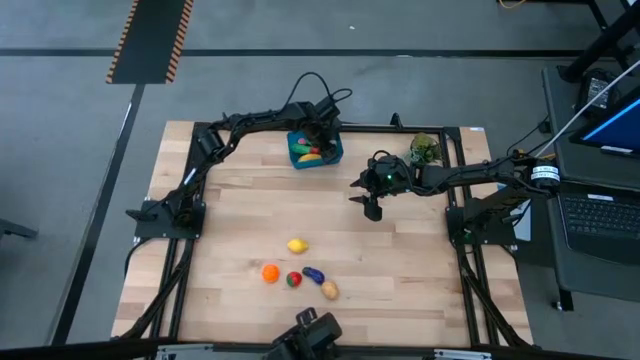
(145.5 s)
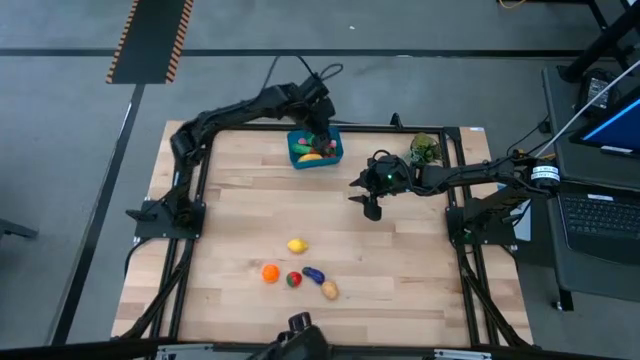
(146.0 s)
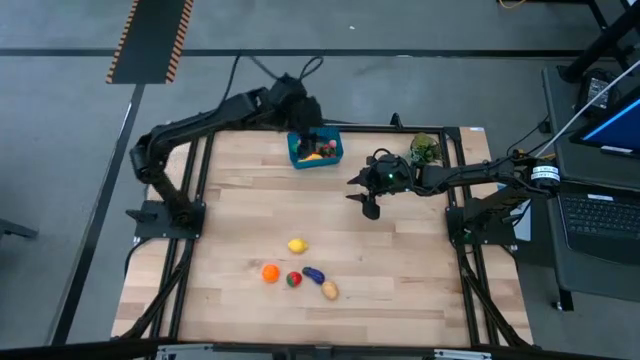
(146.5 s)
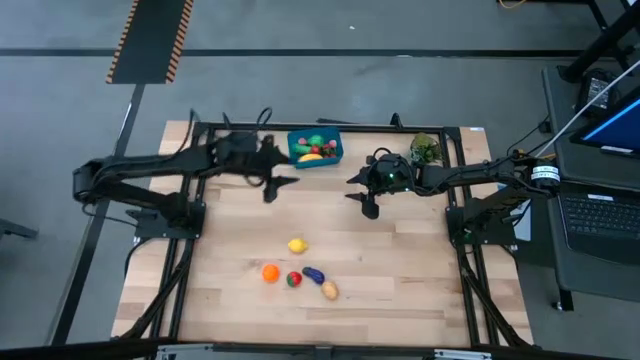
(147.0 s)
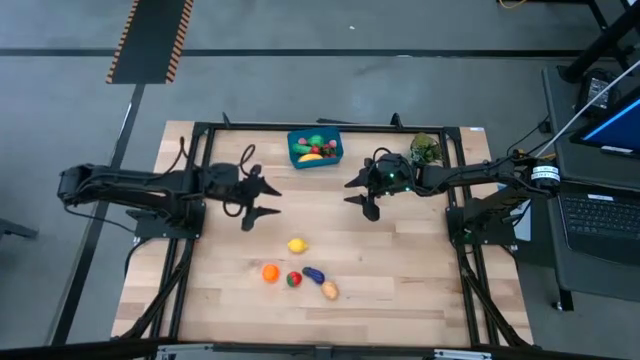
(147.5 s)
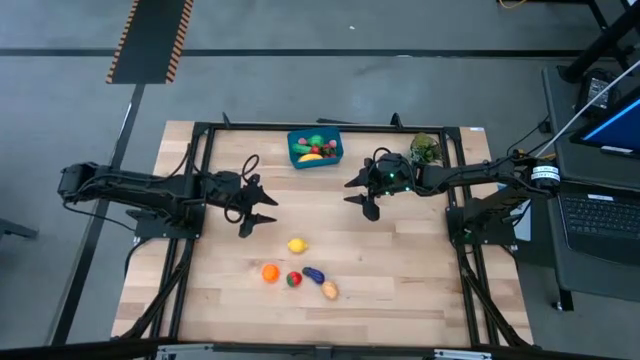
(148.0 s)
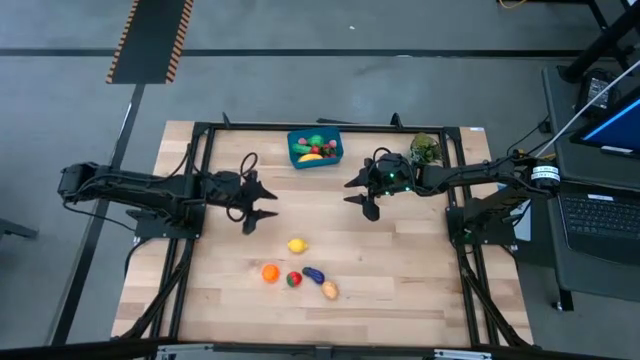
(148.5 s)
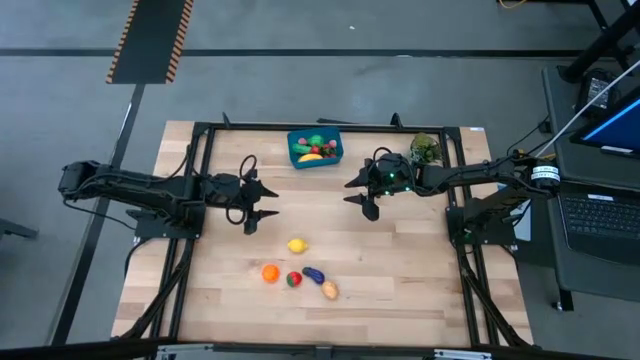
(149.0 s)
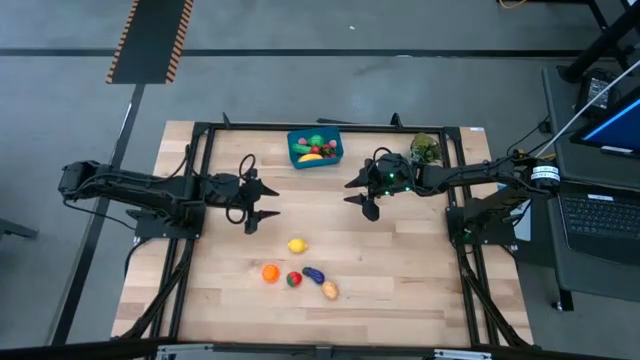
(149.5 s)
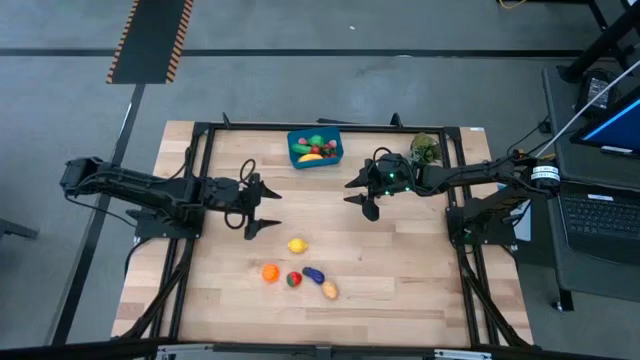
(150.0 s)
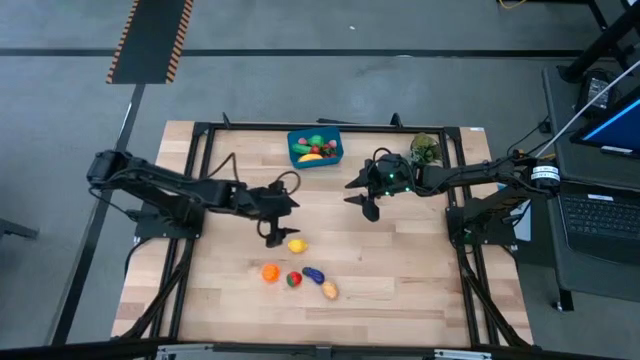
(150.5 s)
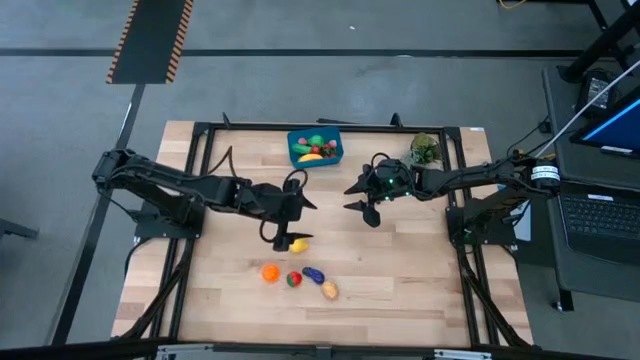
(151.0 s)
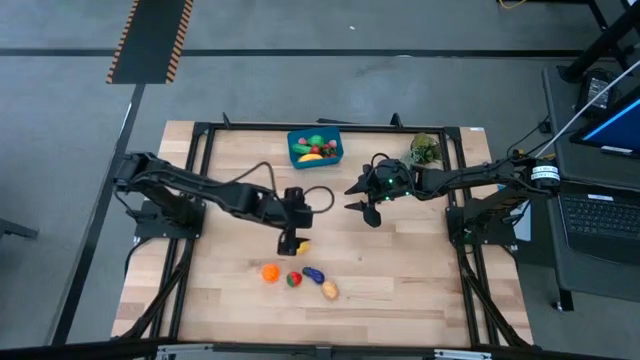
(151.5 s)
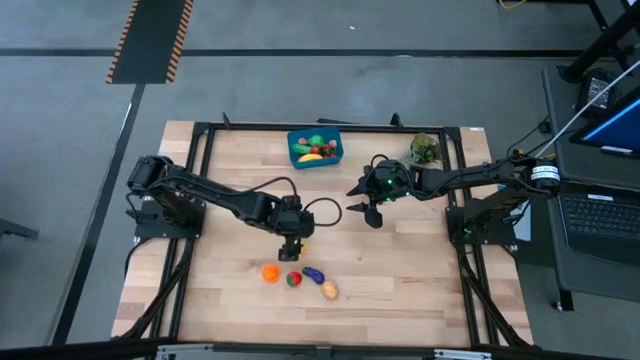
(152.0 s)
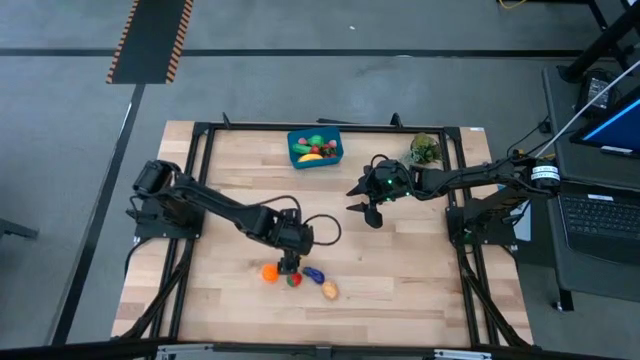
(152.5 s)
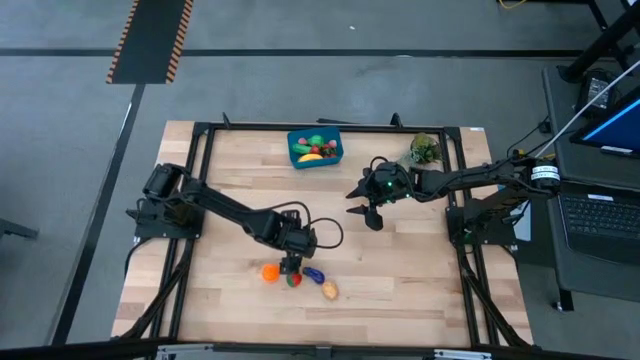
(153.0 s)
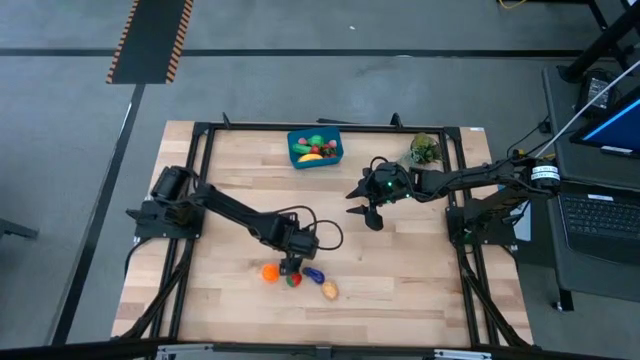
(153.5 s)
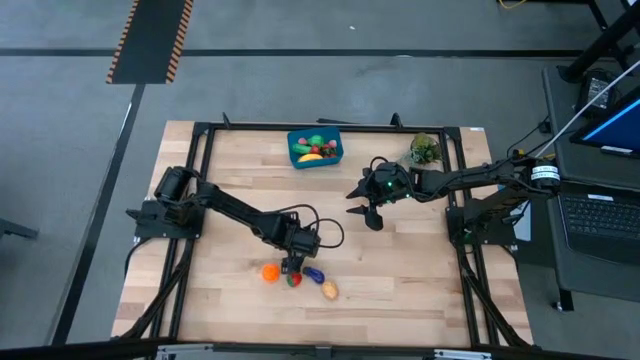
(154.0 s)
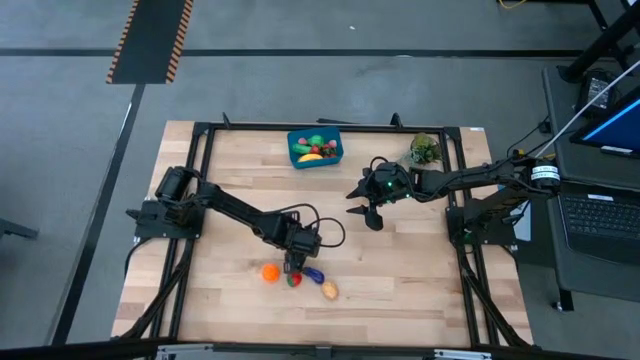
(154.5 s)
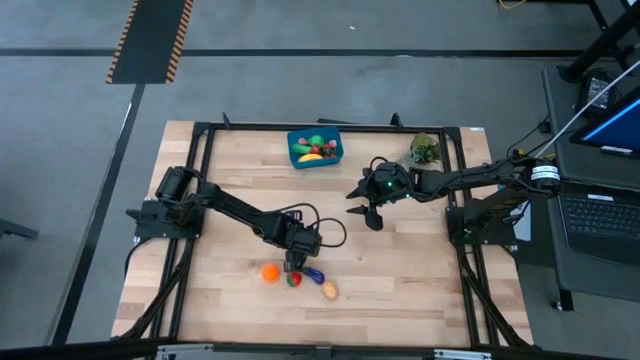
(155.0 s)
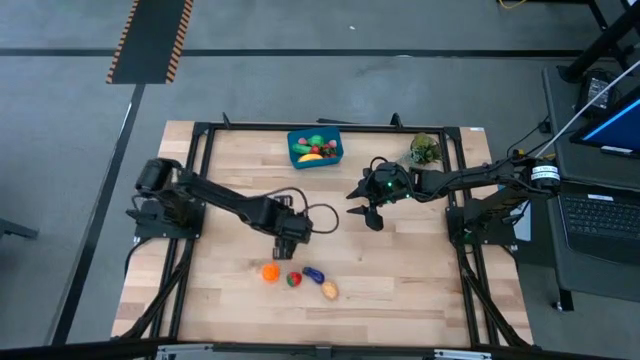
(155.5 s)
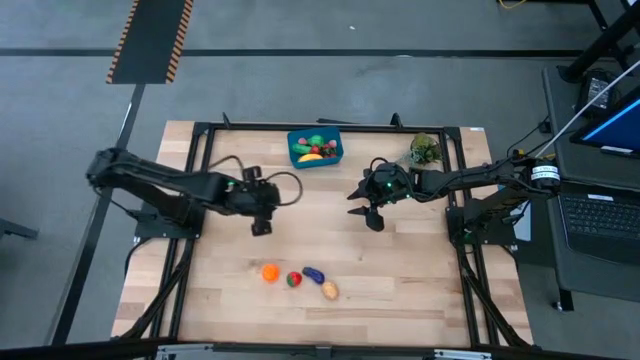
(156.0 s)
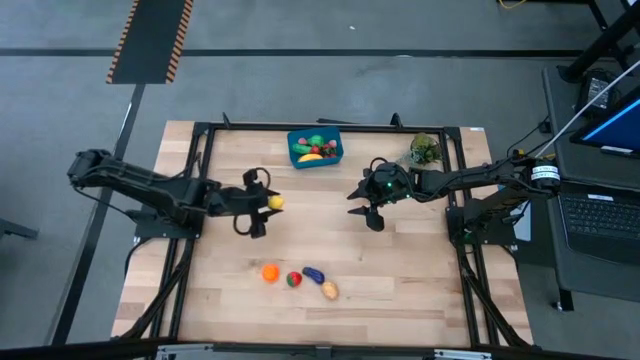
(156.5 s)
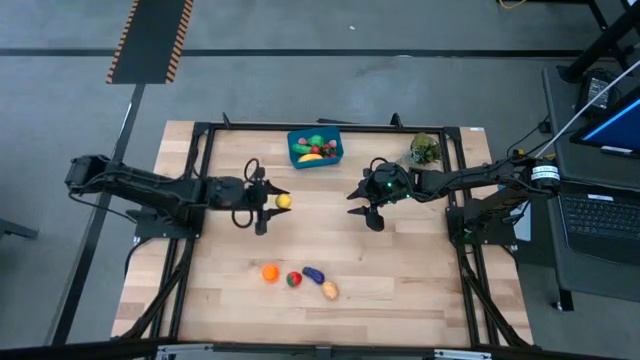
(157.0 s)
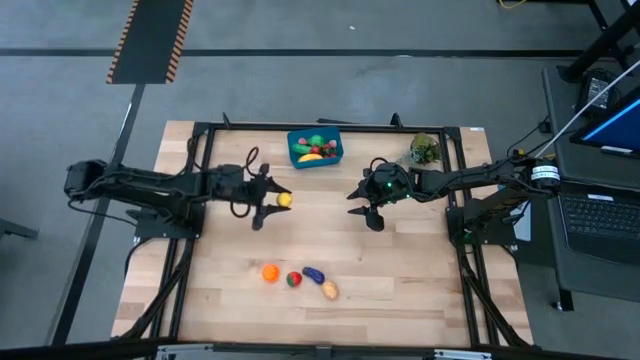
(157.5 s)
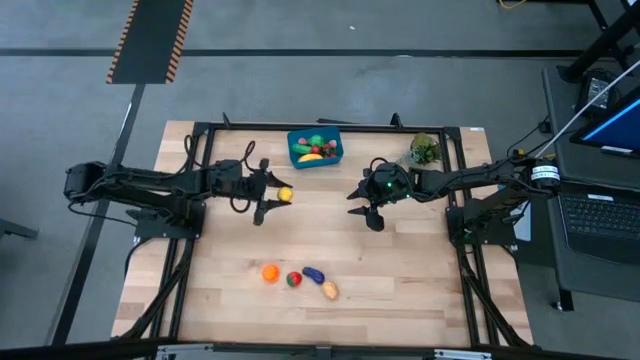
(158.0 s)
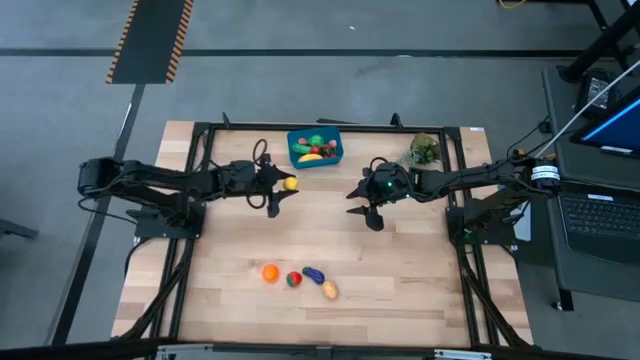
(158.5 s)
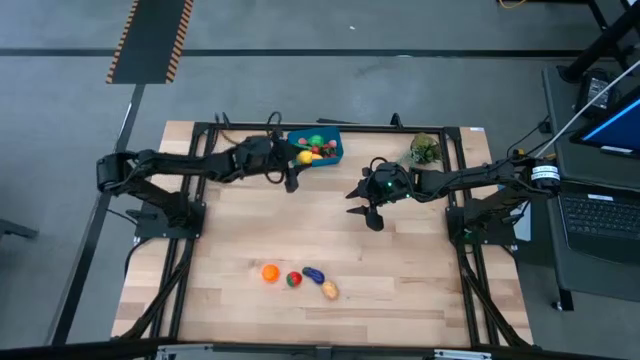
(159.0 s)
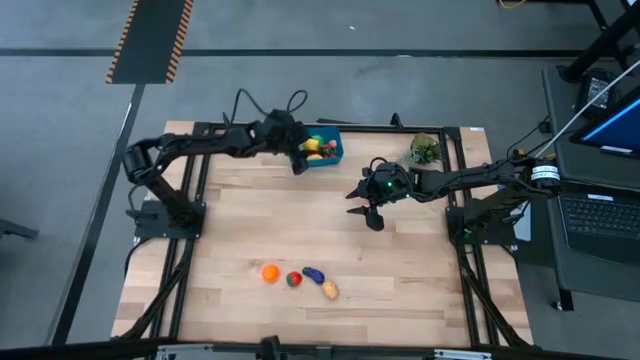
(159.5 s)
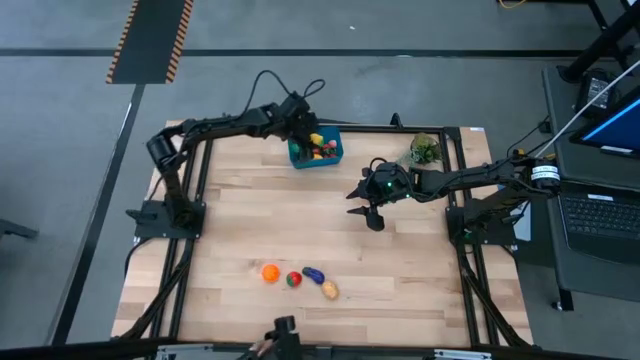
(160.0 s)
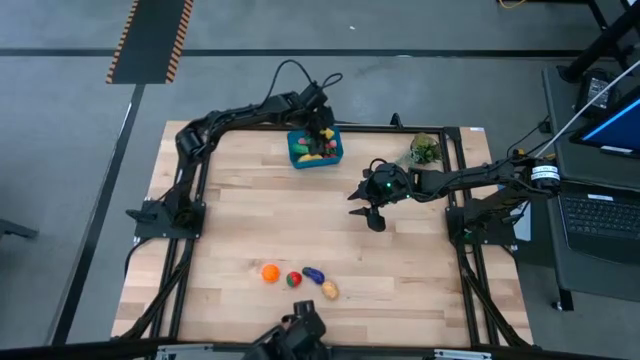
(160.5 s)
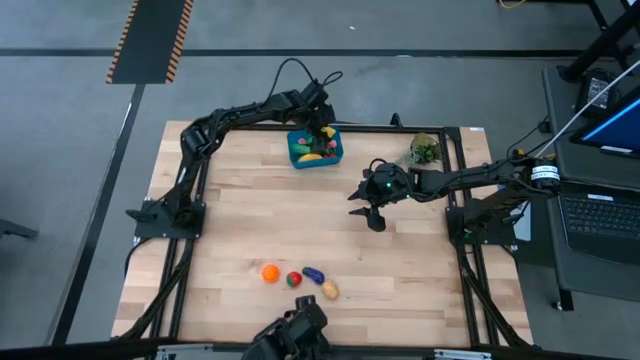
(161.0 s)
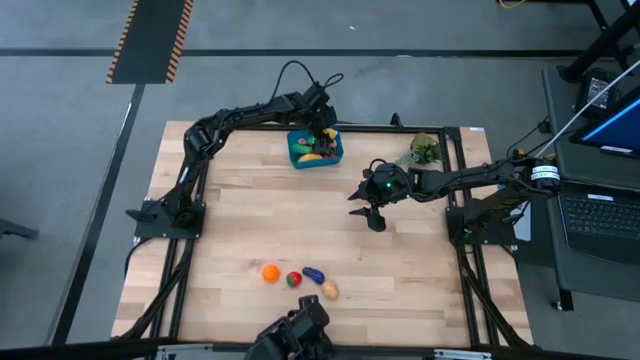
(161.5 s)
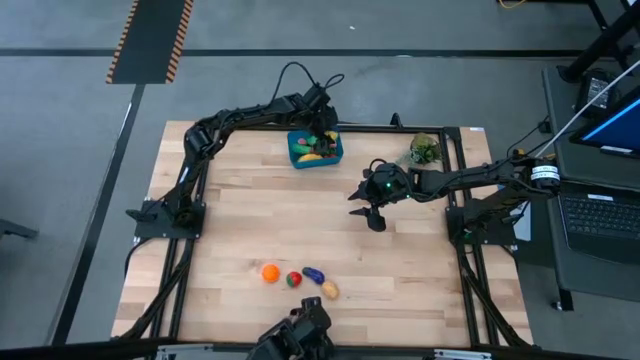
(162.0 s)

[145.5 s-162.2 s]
Task: Pick and placing Produce into tupperware
Put the lemon into the blue bin

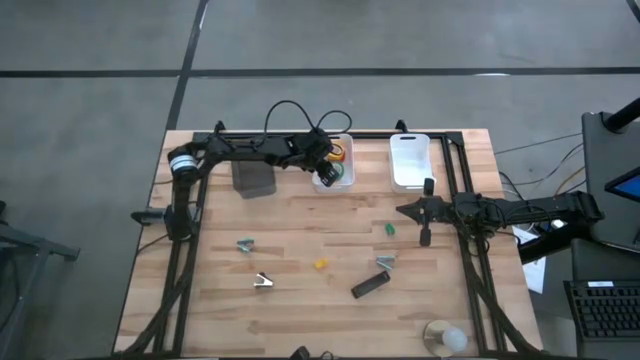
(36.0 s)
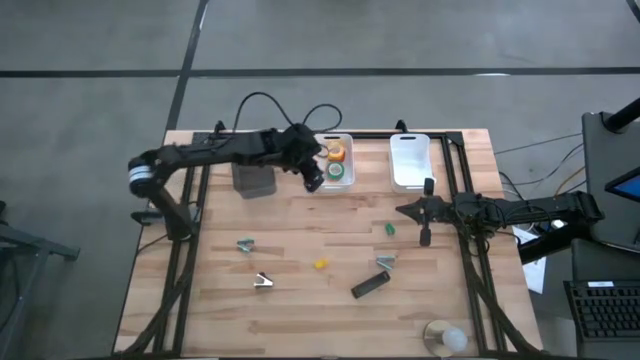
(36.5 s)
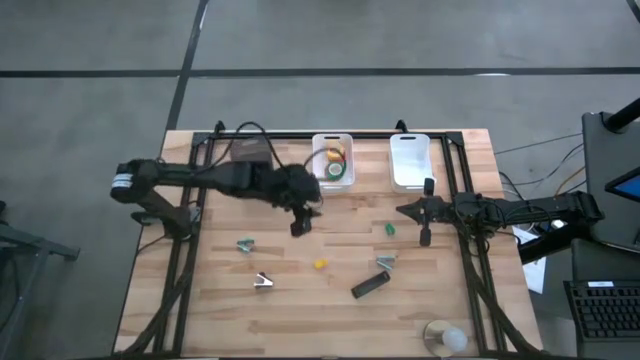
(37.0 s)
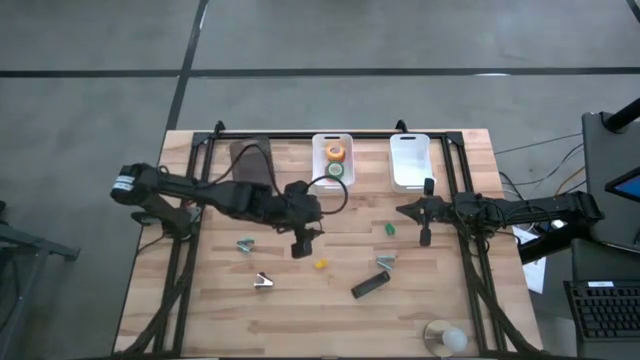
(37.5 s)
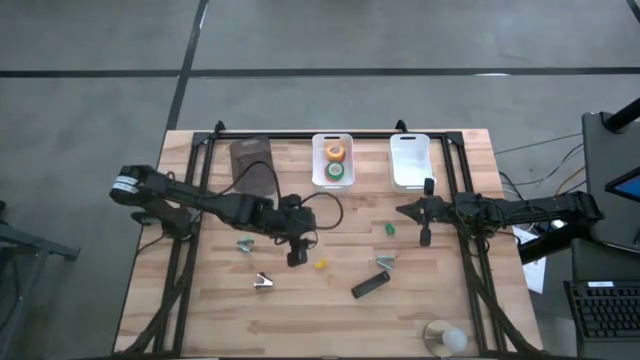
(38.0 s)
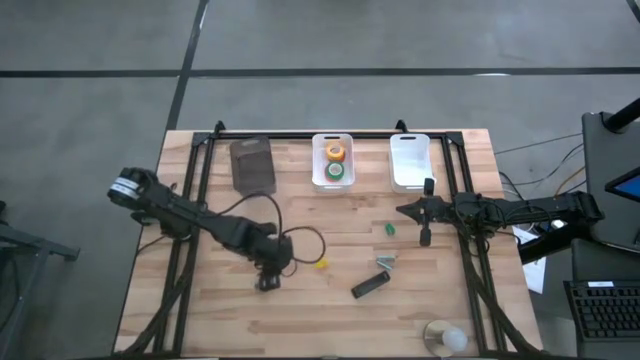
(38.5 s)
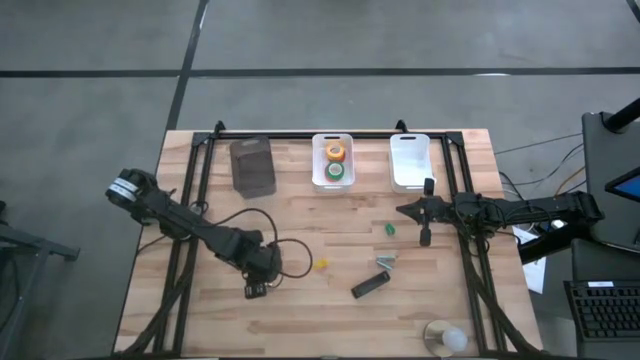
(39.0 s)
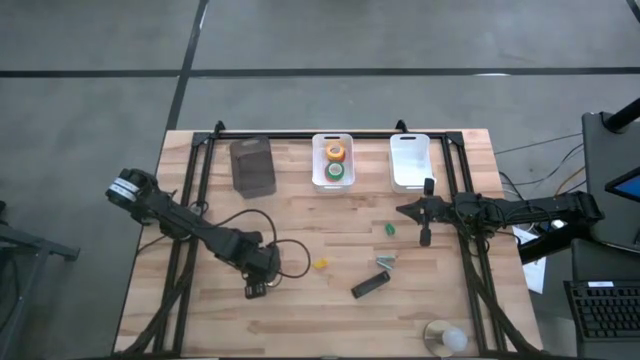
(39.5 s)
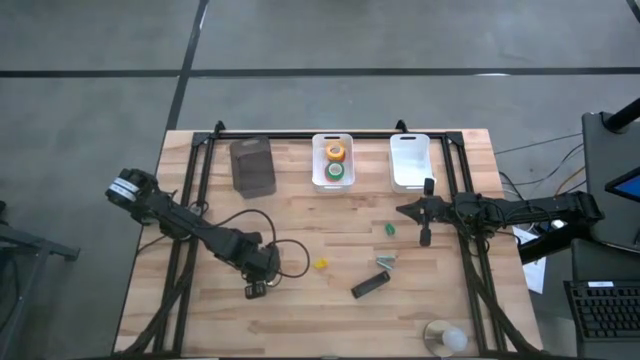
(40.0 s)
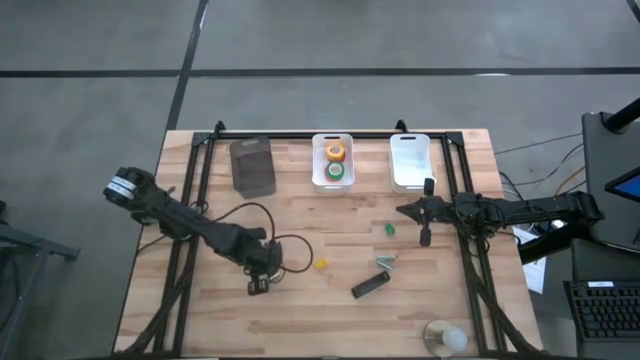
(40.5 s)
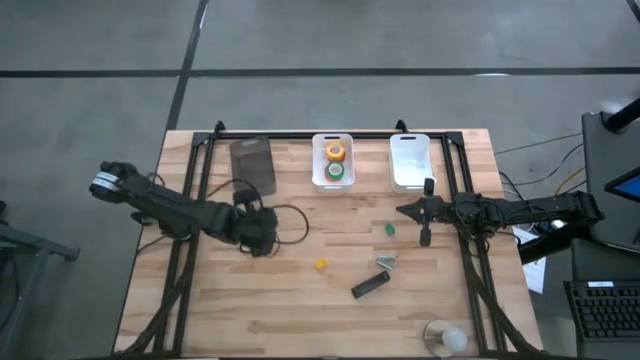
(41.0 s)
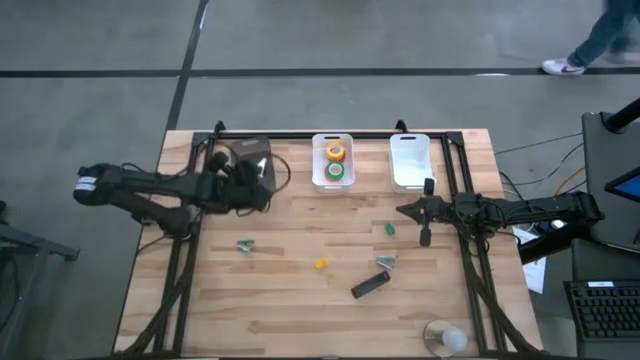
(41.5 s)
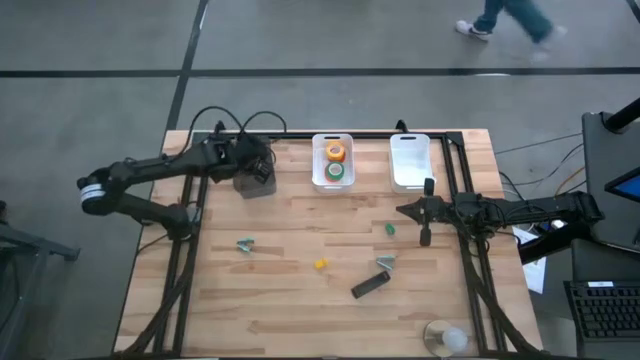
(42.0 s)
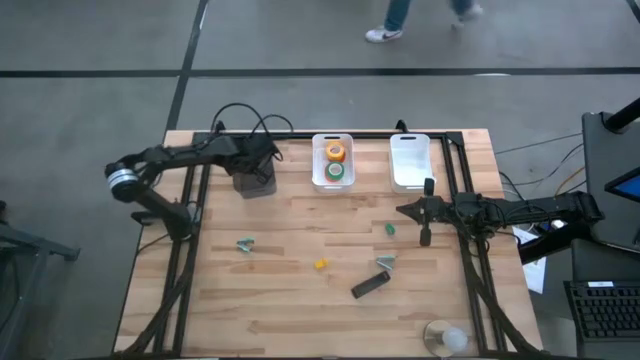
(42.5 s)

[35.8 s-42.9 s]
Task: Pick and place Stapler, Stapler remover, tape
Put the gray staple remover into the black bin
